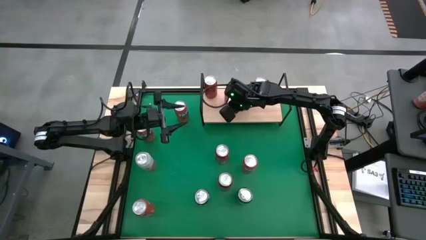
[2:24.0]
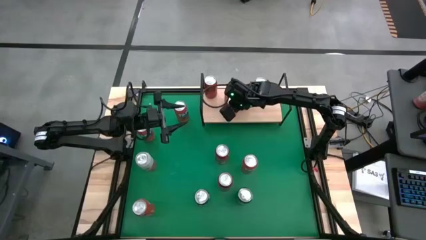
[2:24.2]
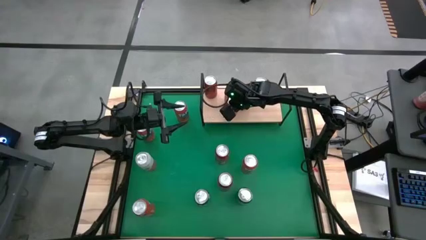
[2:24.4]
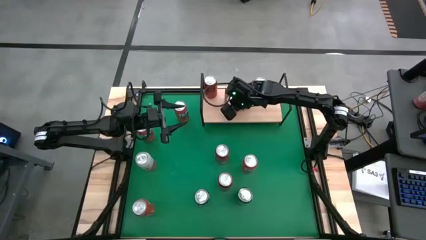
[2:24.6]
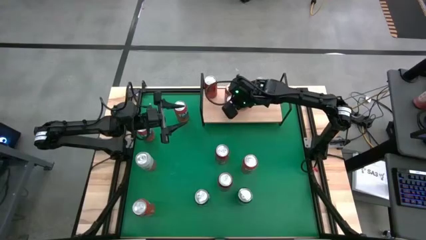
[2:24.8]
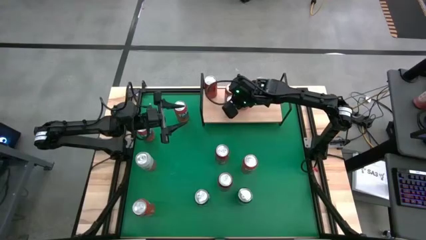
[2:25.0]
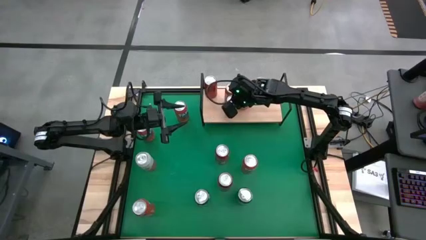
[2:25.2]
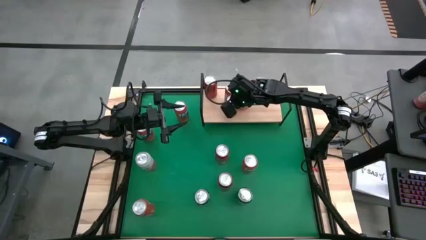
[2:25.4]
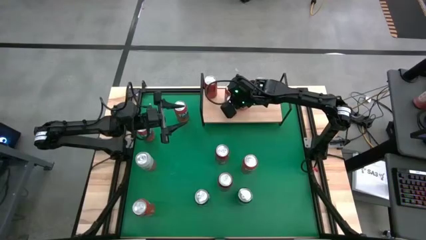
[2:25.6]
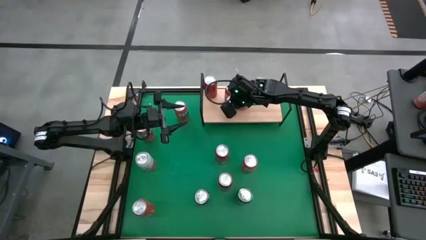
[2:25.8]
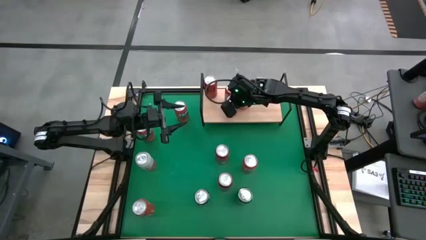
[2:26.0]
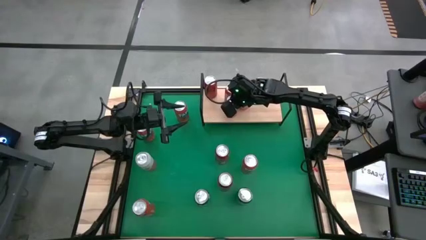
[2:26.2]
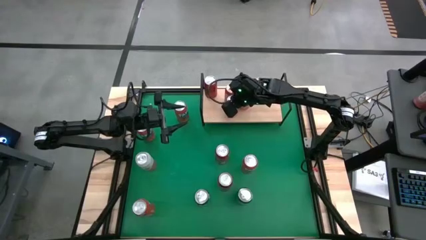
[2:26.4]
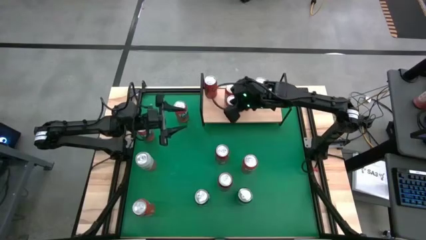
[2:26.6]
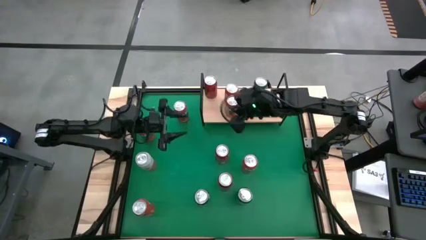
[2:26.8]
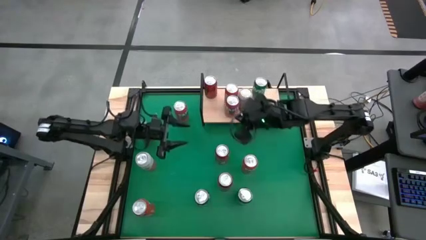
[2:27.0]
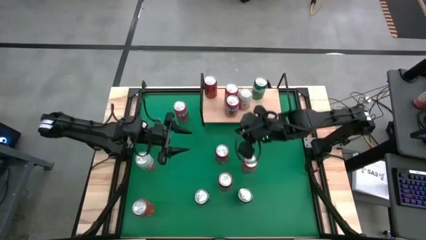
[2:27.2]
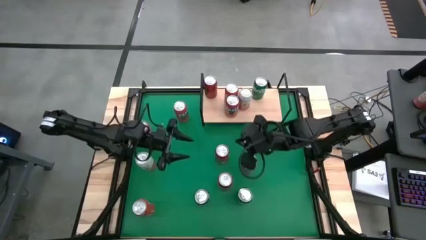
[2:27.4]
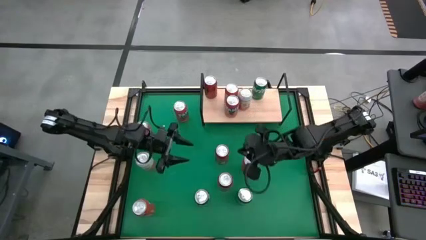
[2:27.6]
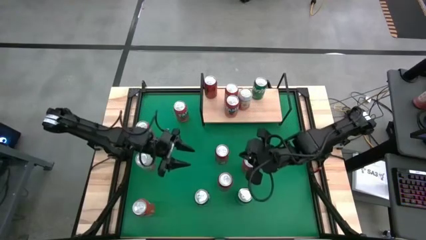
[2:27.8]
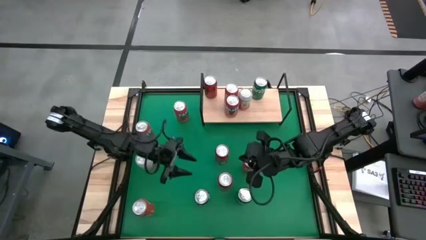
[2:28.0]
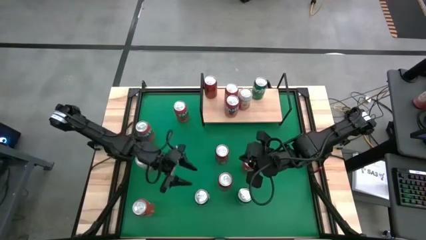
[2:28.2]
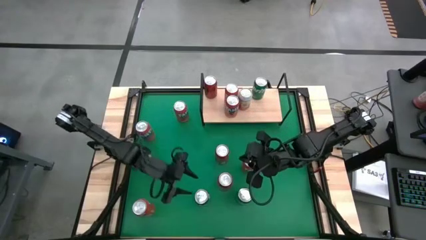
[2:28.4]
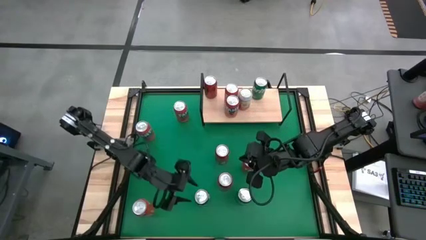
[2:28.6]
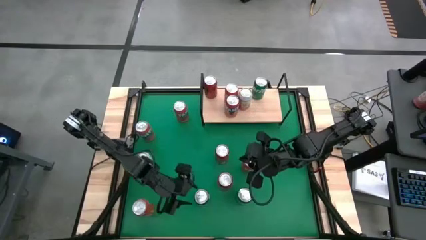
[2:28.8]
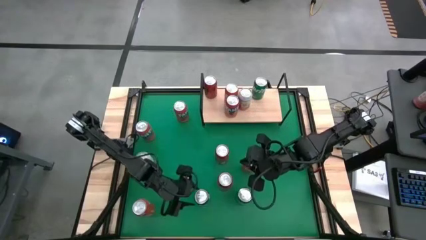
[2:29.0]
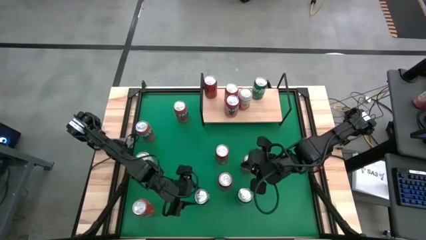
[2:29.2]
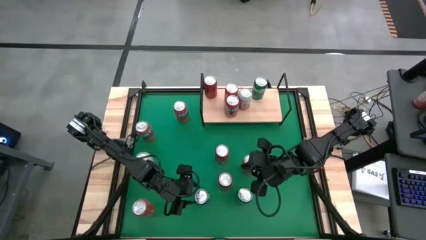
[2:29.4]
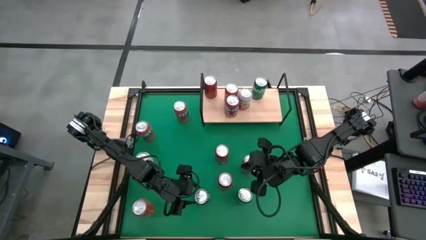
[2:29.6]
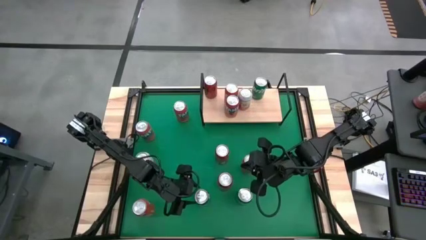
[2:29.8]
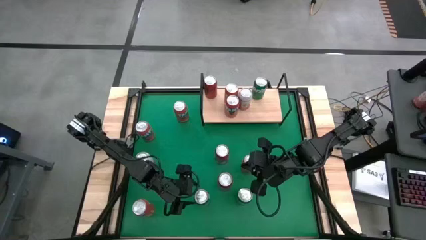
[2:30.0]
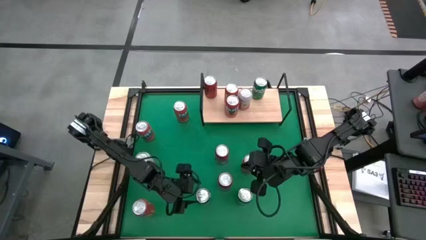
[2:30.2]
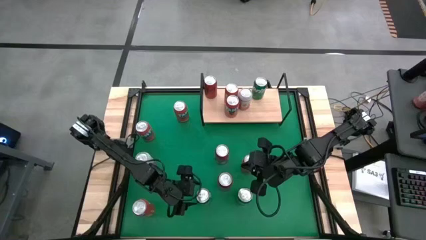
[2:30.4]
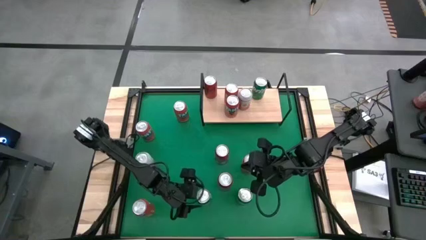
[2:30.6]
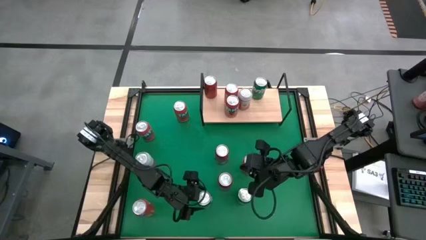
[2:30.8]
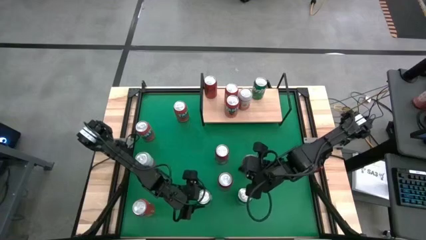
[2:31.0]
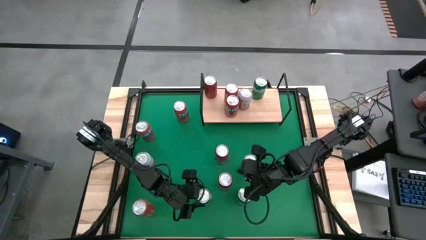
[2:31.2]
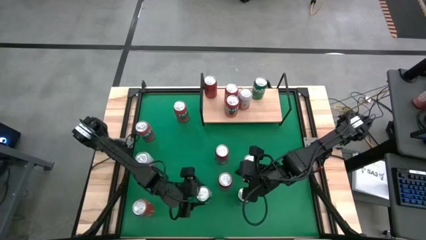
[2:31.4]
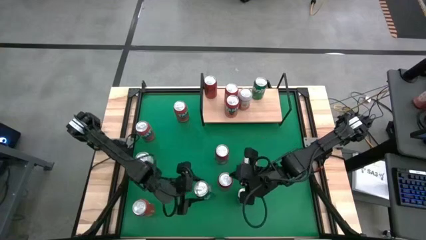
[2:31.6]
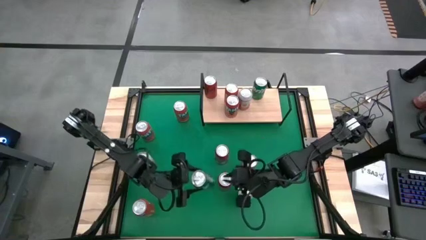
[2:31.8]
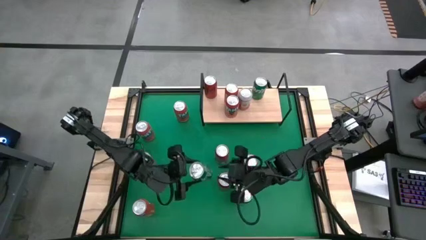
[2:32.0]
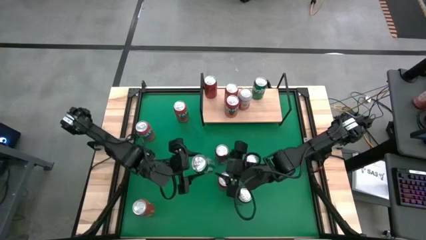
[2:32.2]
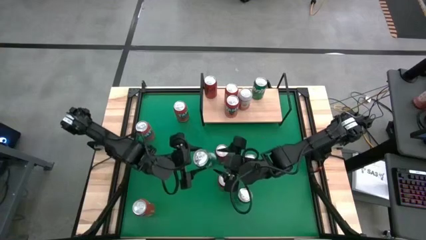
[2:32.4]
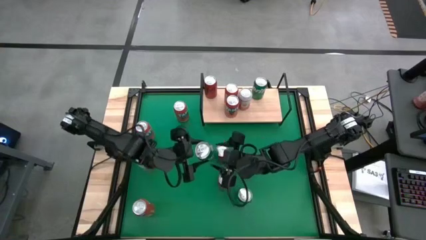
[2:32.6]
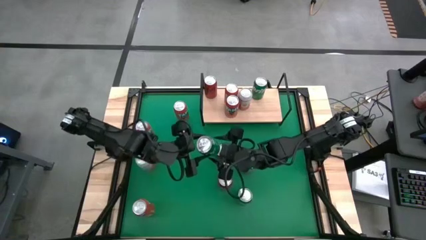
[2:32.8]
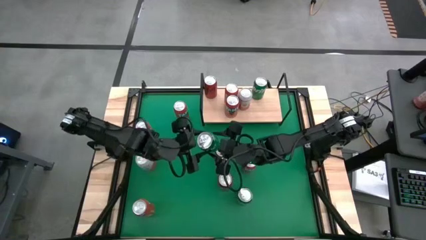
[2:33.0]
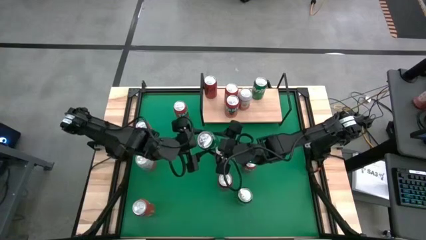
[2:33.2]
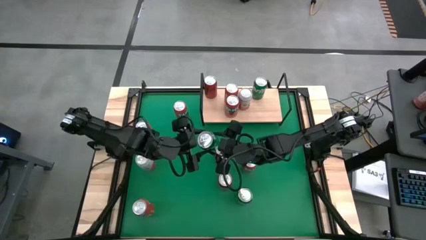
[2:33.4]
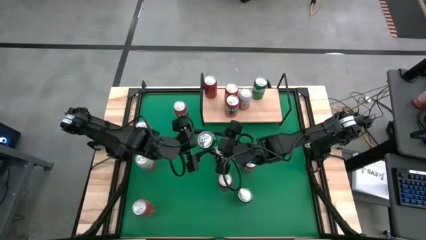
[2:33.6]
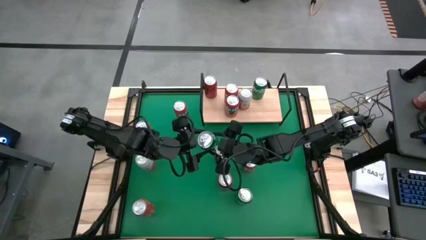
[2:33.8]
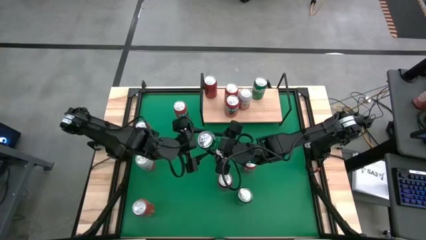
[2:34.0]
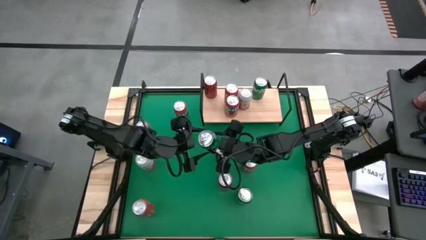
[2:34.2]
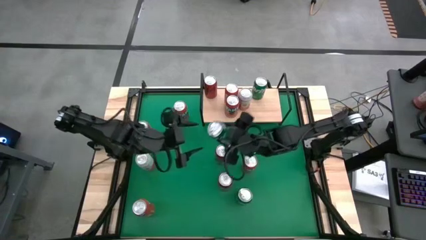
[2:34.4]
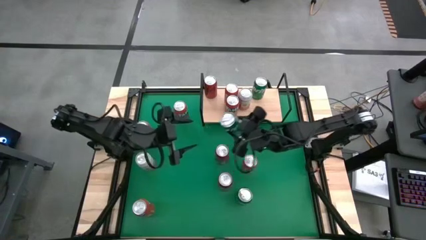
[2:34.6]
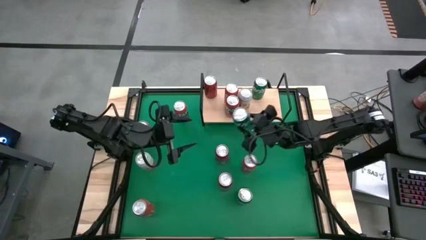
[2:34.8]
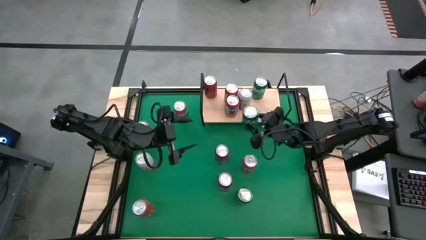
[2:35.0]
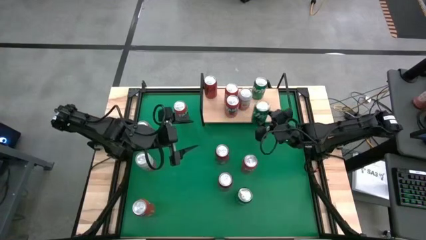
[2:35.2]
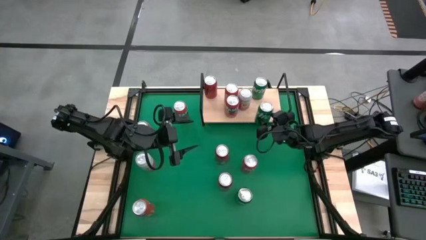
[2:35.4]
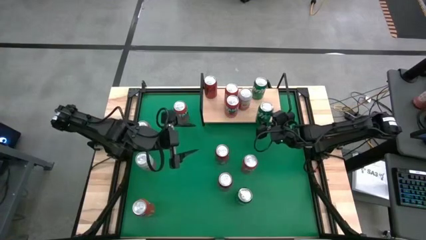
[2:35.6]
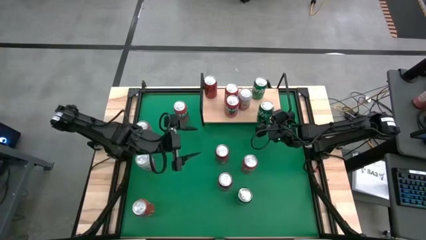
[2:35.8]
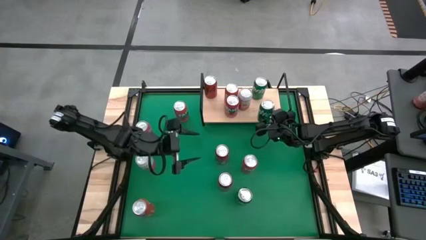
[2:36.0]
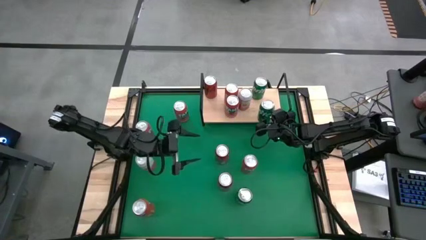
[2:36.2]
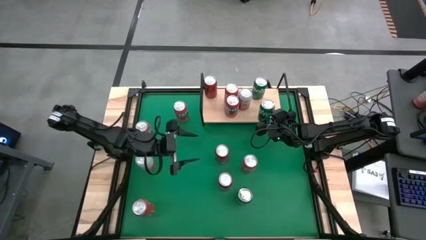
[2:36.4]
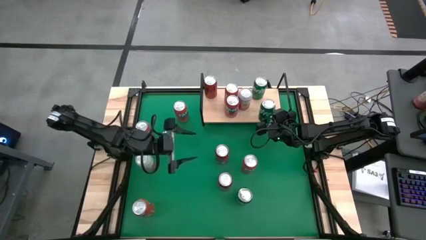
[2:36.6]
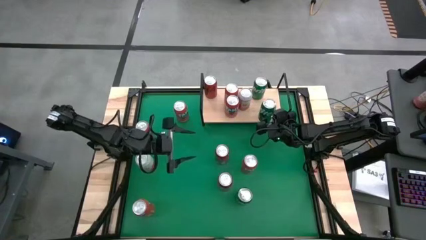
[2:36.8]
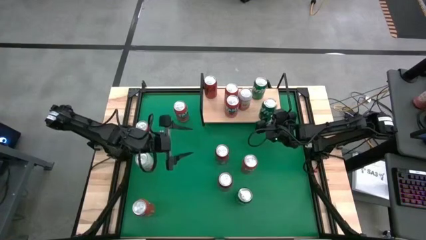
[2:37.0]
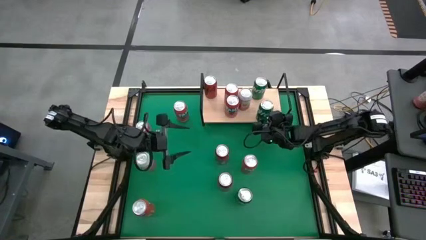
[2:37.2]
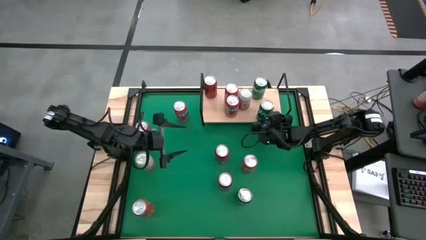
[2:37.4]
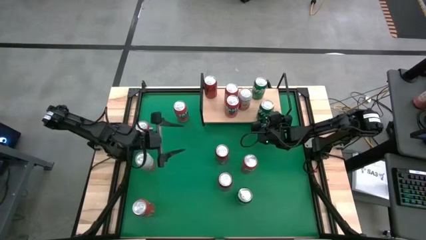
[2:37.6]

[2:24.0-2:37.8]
Task: Place canned beverage on shelf
Put the green soda can on the shelf aligned with the other green soda can
